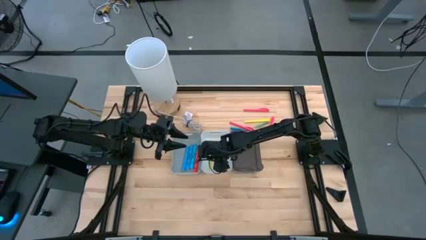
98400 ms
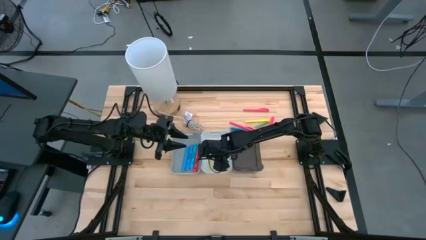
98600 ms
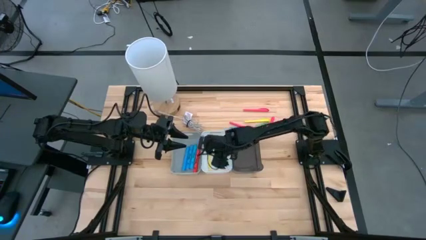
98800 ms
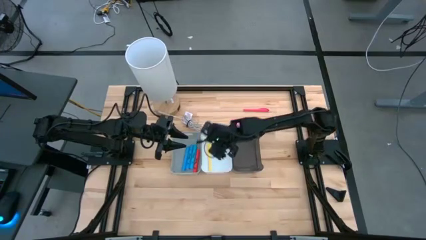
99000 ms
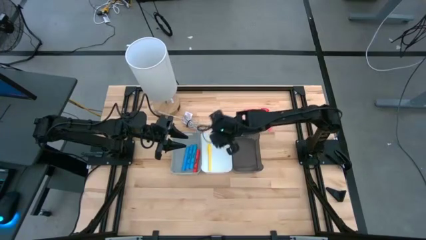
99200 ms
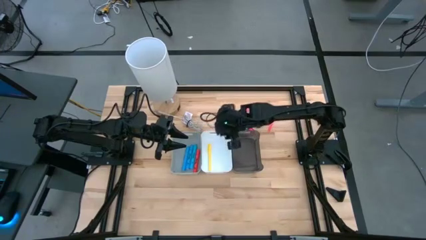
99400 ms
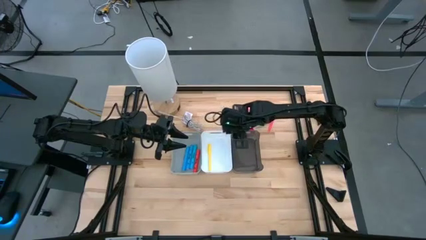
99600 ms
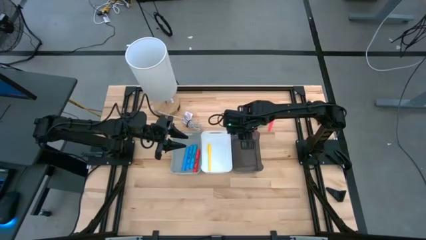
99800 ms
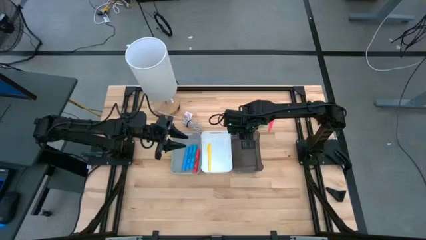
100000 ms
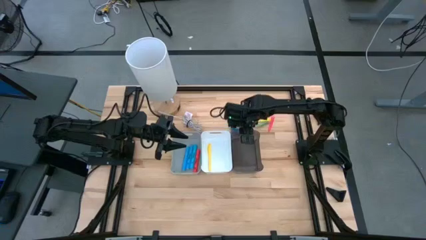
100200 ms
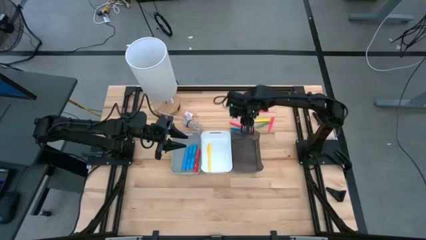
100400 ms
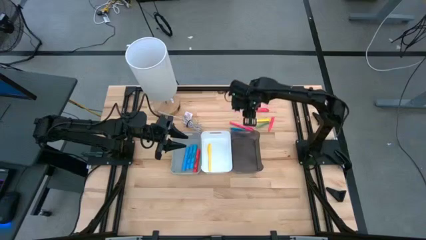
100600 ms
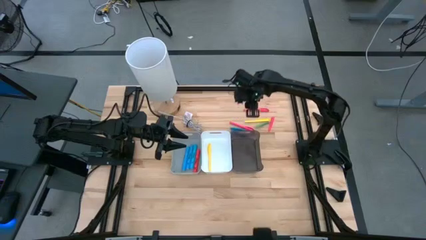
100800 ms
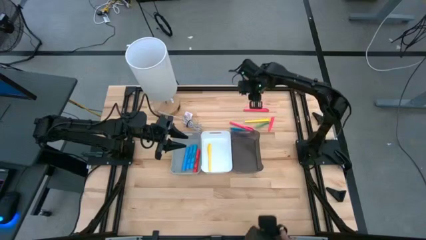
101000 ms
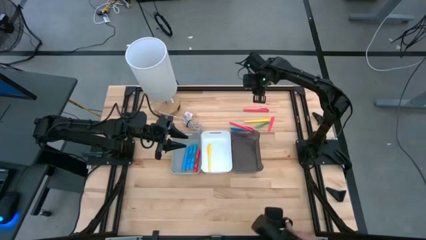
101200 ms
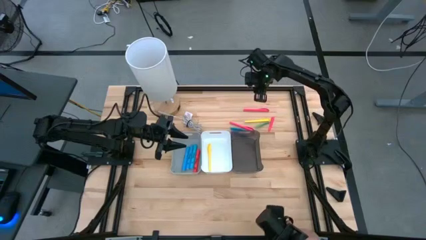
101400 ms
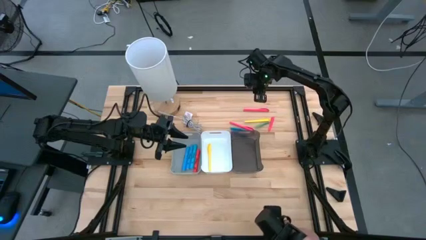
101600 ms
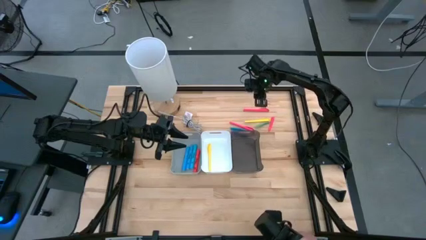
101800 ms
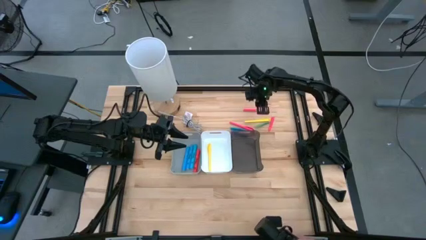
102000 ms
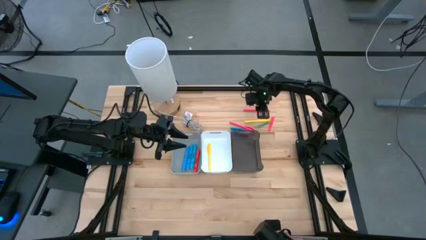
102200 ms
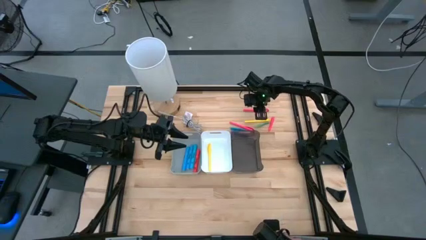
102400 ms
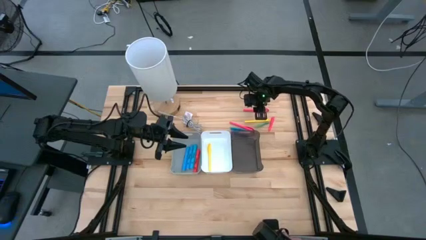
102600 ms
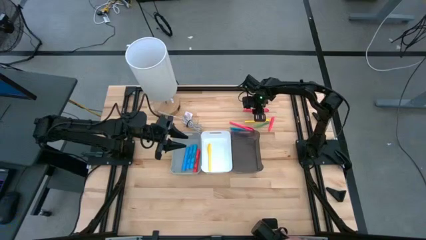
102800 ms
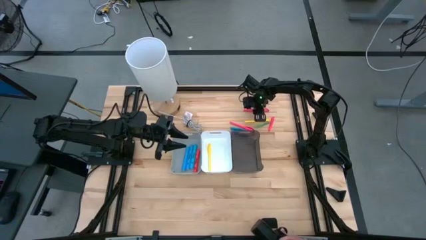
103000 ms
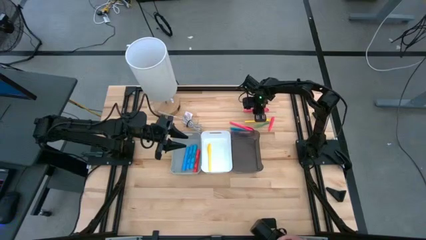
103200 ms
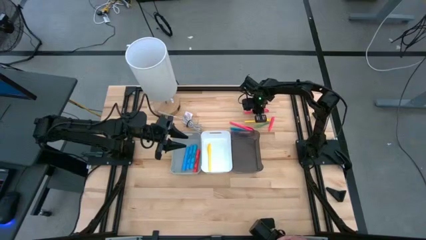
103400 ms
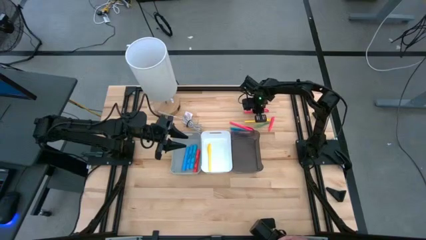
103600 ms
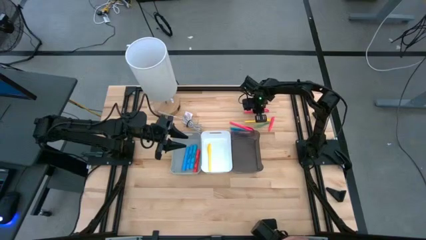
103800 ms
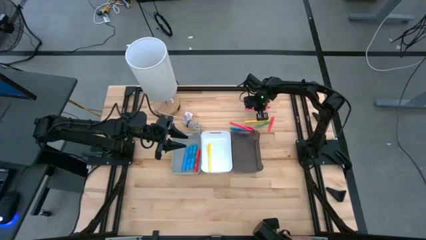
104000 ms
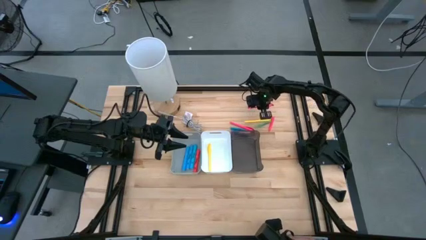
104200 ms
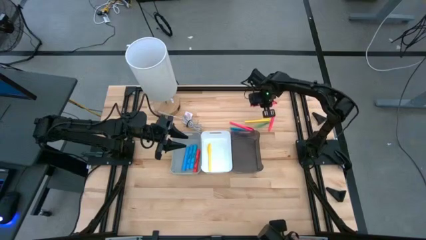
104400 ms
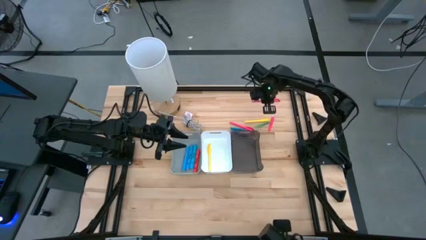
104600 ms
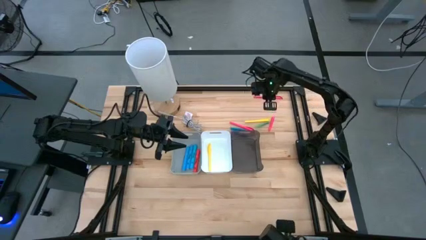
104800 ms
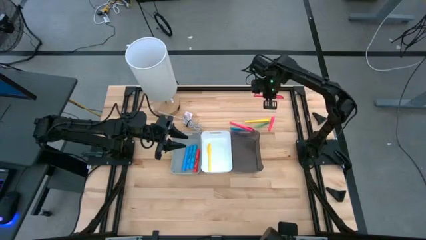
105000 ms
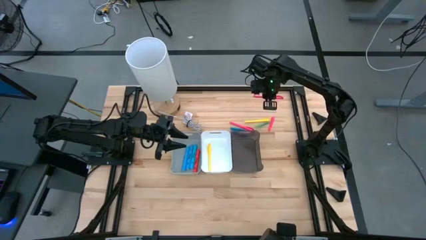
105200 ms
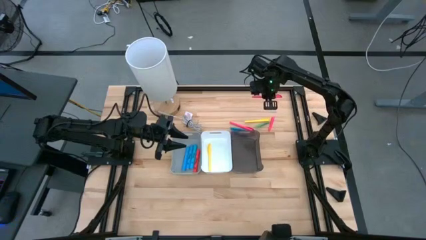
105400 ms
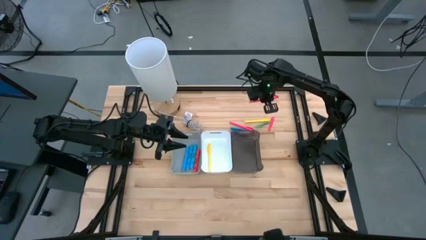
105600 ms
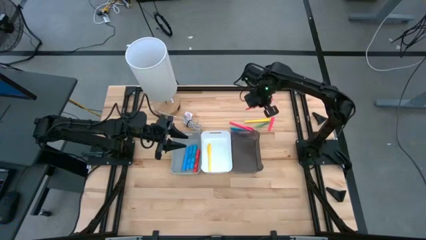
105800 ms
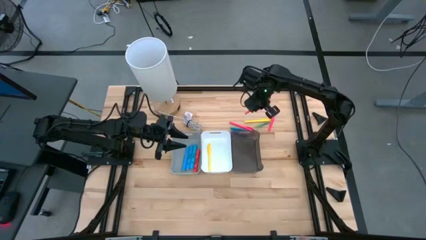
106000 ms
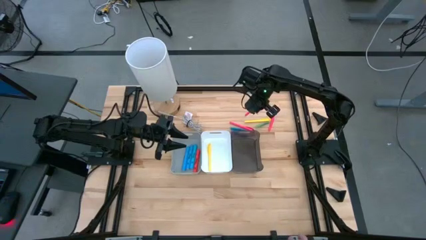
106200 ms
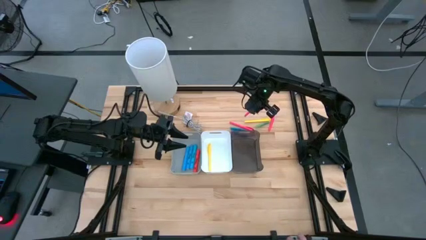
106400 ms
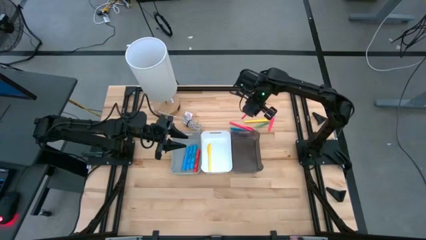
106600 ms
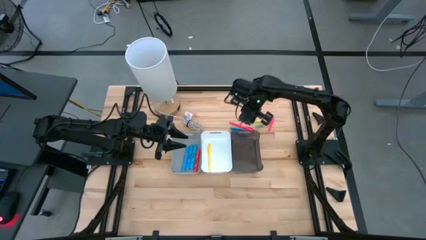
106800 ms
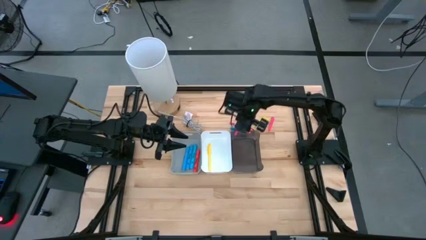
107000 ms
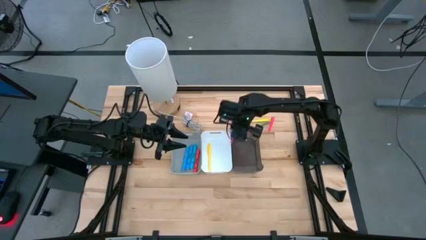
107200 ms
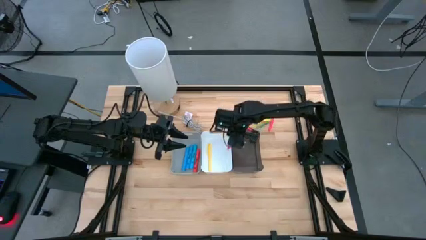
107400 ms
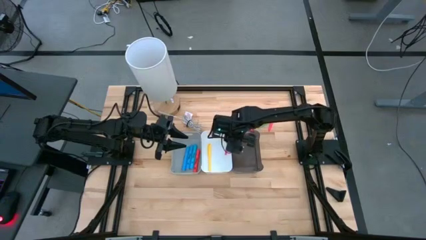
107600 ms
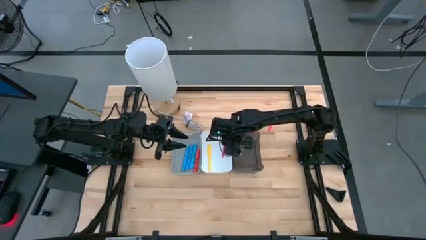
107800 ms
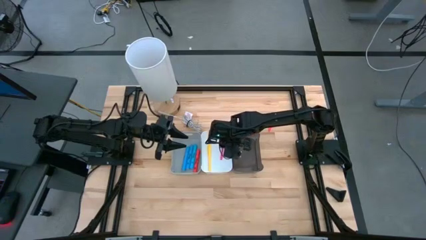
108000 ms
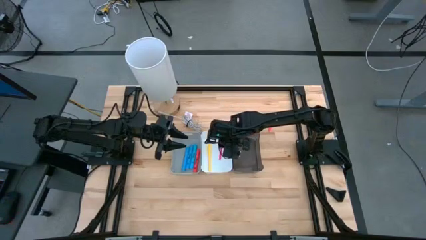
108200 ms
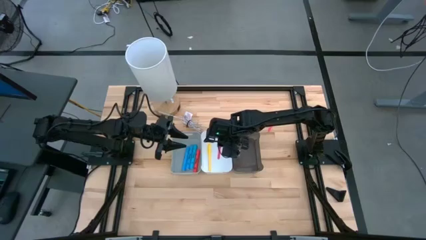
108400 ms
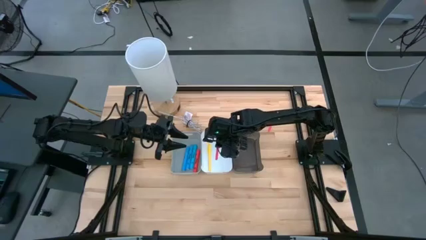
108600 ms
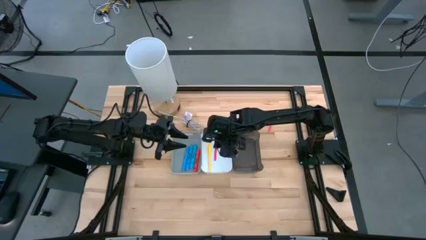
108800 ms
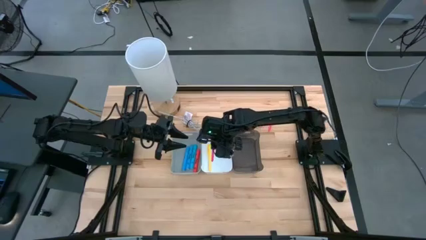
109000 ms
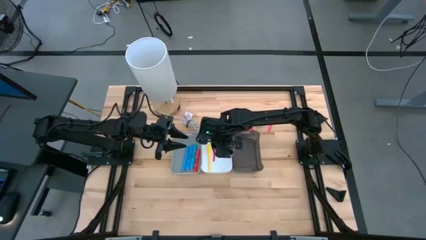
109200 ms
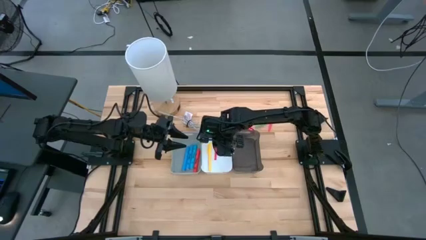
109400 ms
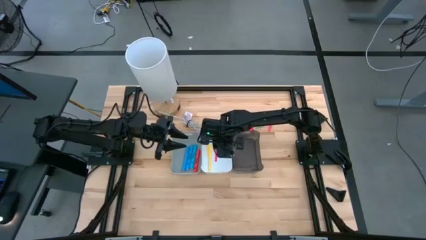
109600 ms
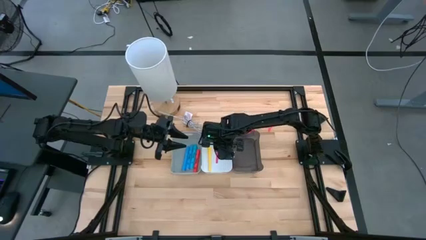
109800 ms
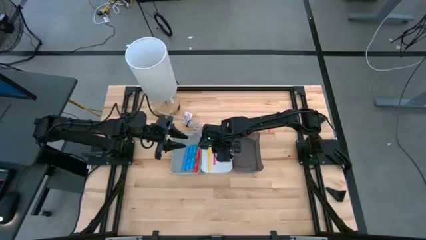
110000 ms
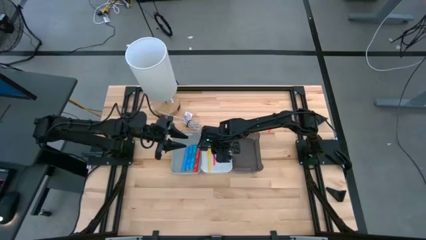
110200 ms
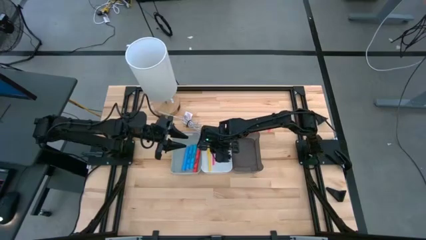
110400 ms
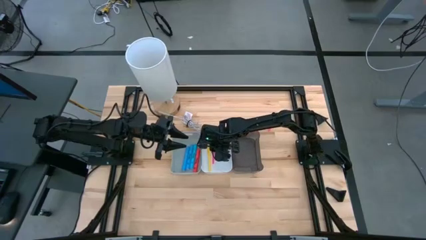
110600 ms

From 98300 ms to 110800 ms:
Task: Pick & Place Markers
Put the top big pink pen into the white bin

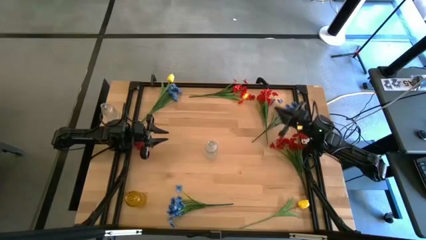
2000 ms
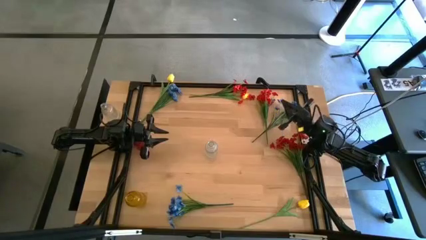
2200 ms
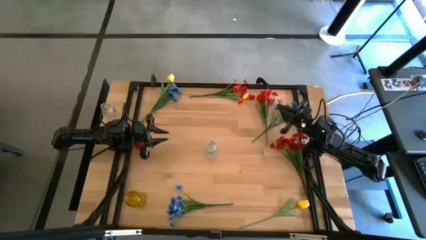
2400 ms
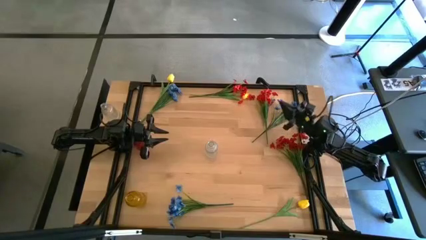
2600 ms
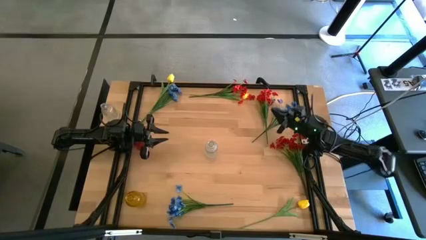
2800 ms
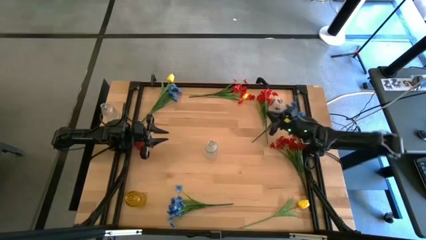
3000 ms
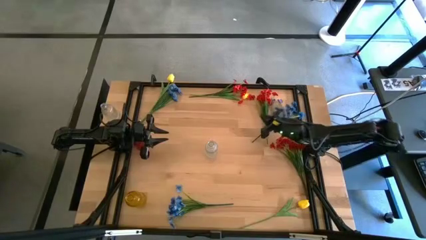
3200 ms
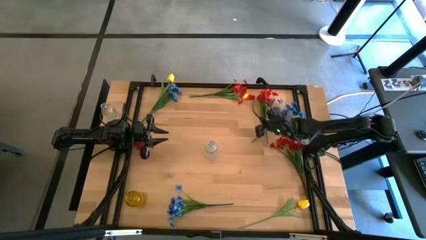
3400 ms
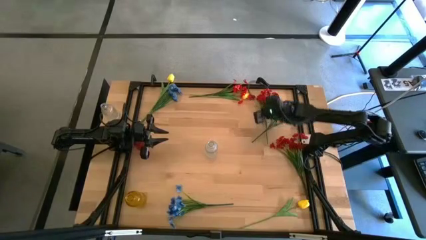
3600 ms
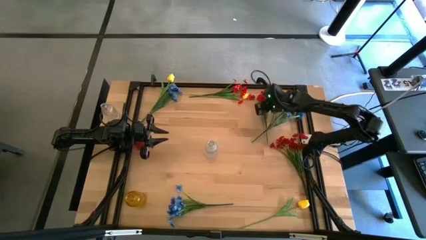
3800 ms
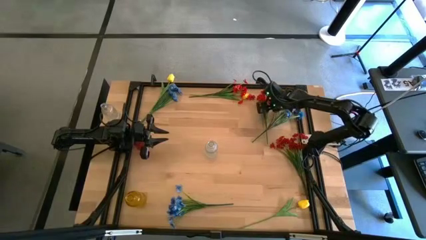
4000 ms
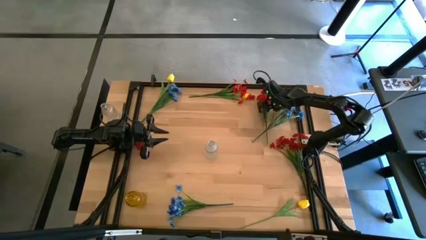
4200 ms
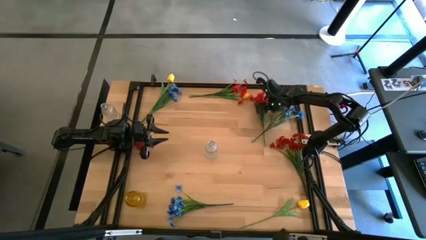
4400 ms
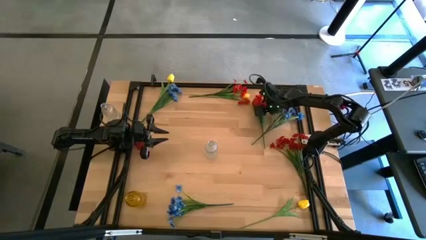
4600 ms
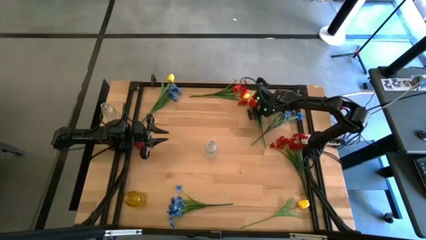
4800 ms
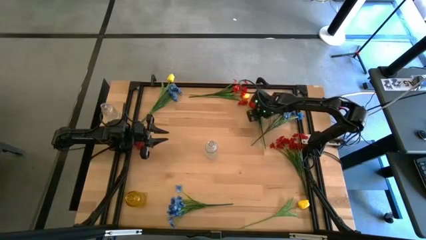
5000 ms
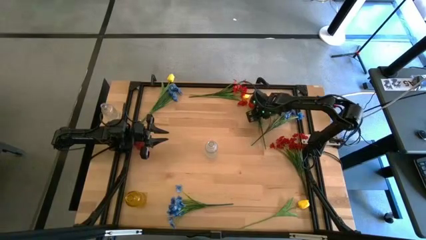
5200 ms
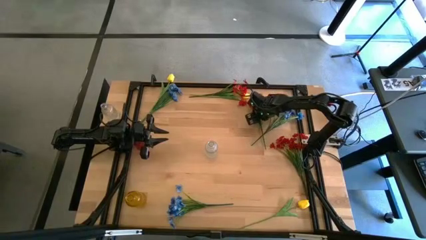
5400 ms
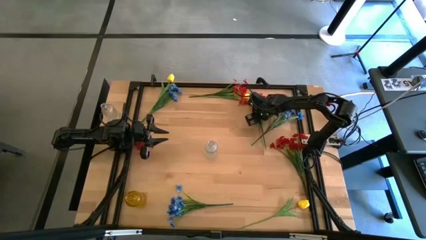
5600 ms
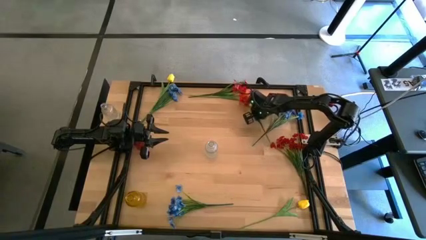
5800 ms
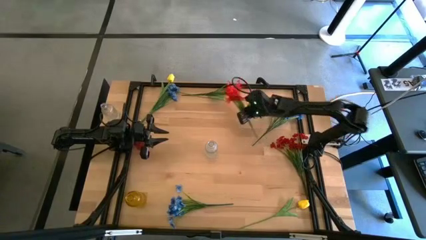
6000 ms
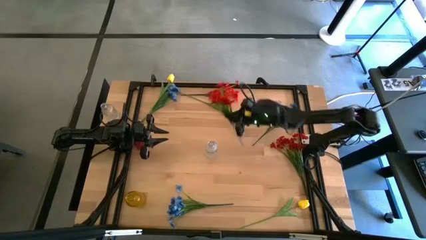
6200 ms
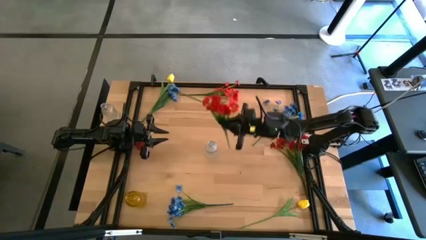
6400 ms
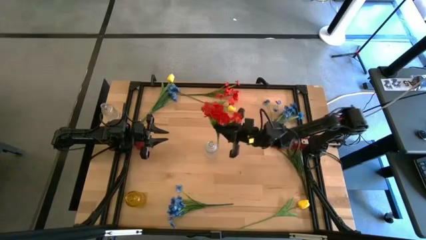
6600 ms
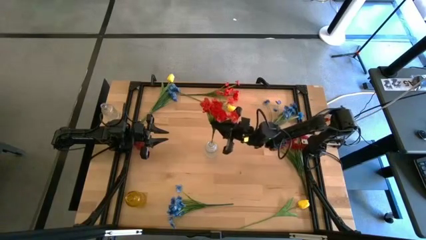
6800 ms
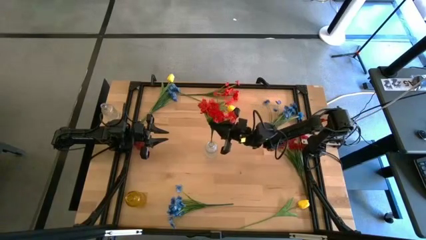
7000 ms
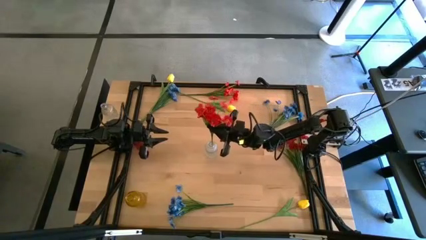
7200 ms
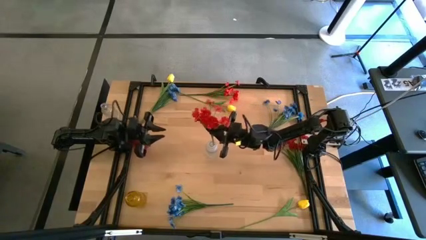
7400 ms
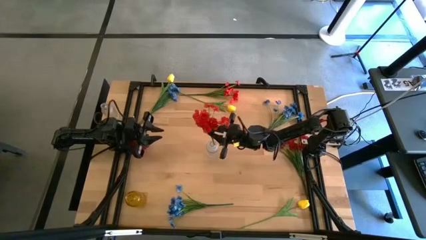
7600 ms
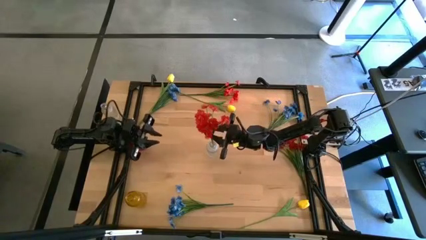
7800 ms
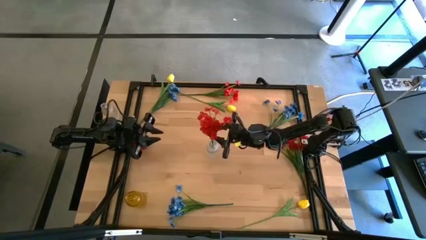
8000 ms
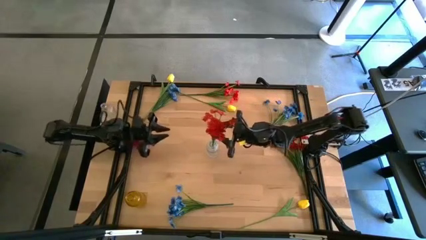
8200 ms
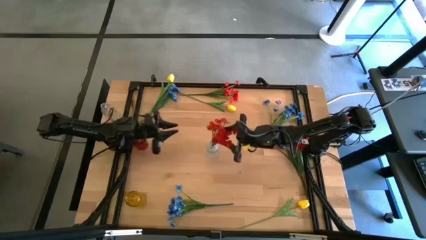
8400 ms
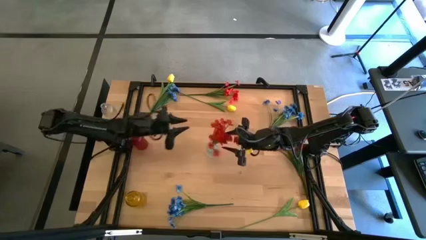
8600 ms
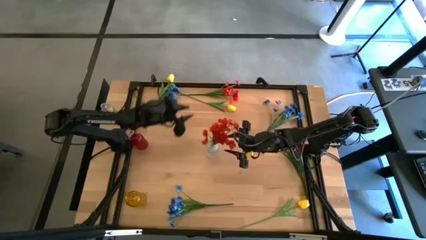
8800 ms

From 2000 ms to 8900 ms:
Task: Sort flowers into vase by color
Put the top right red flower into the transparent vase
